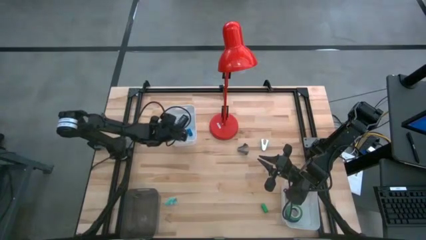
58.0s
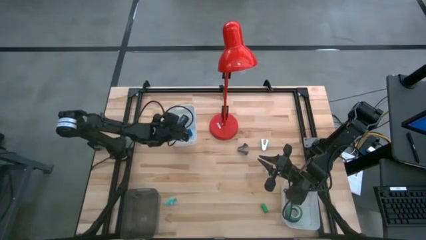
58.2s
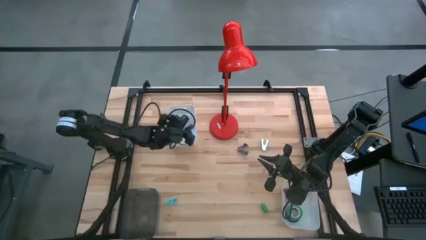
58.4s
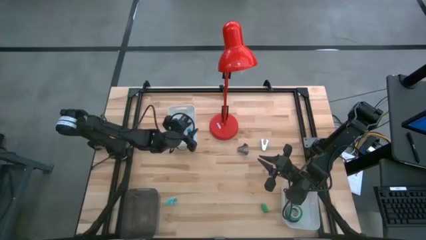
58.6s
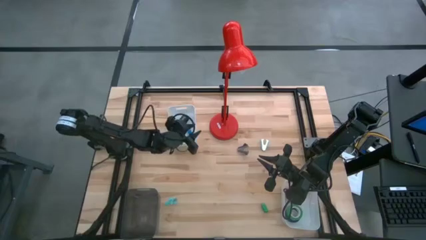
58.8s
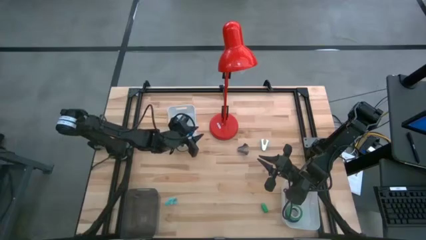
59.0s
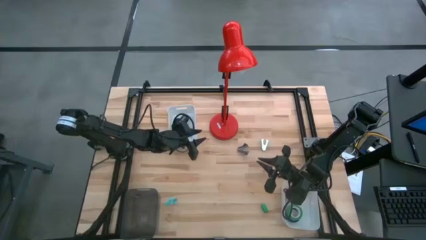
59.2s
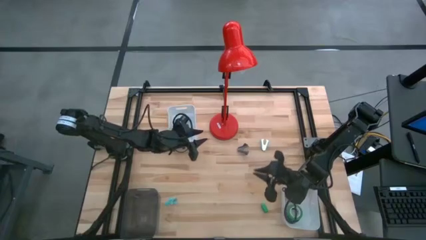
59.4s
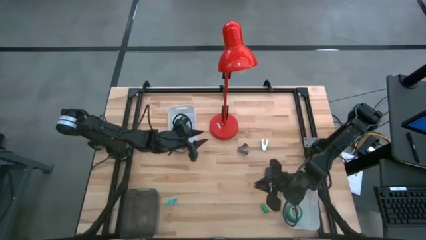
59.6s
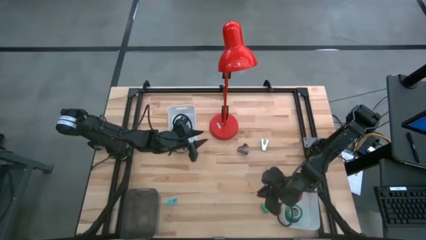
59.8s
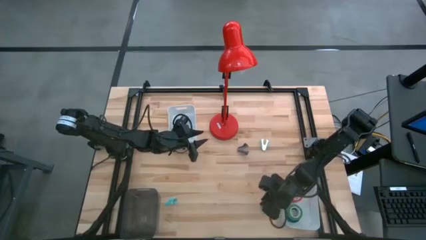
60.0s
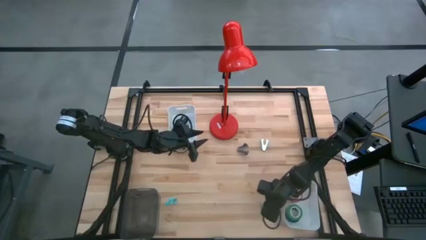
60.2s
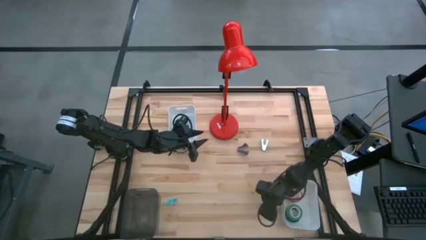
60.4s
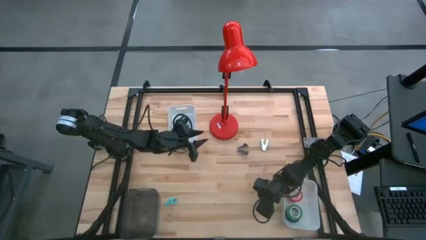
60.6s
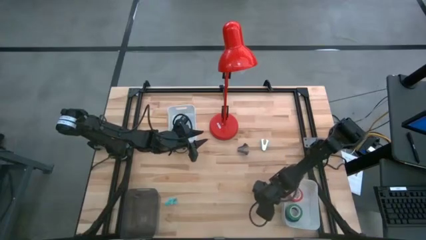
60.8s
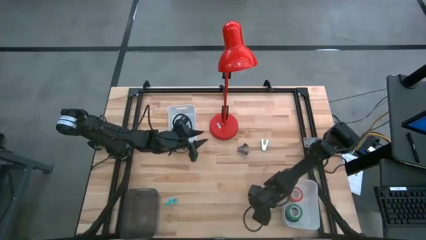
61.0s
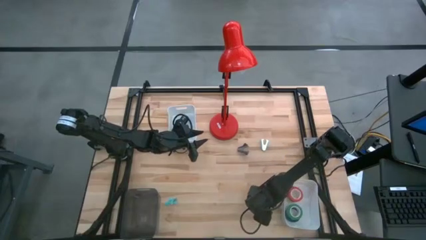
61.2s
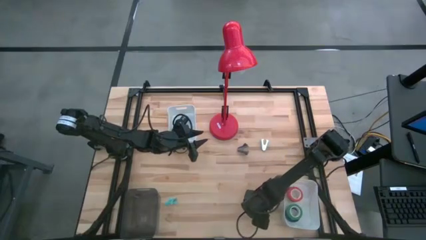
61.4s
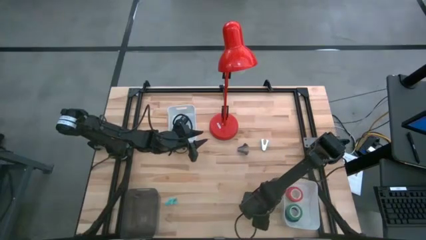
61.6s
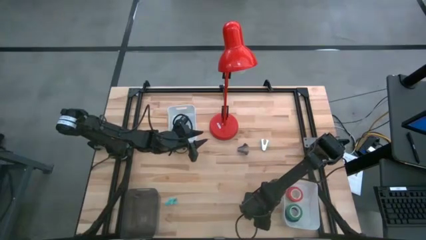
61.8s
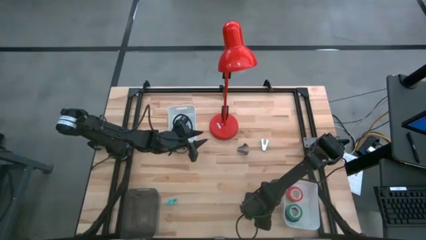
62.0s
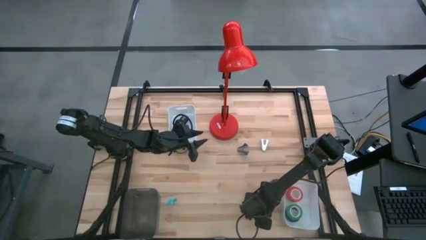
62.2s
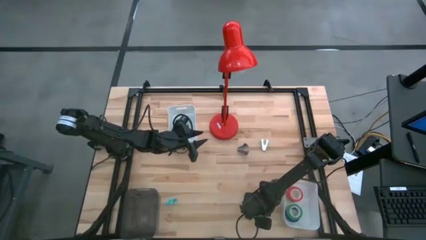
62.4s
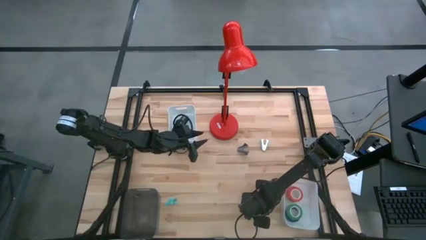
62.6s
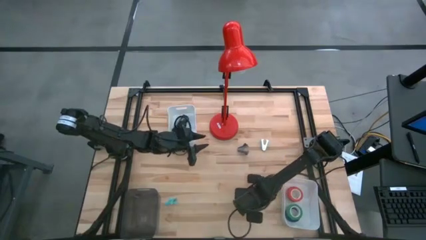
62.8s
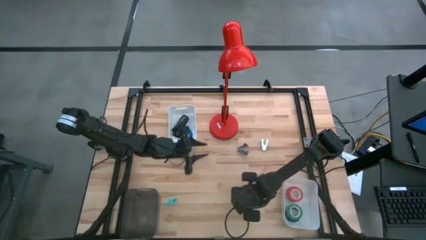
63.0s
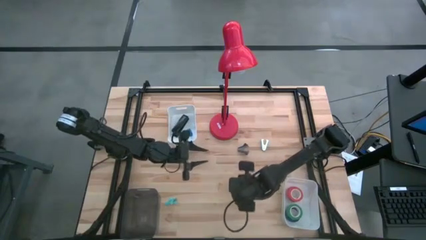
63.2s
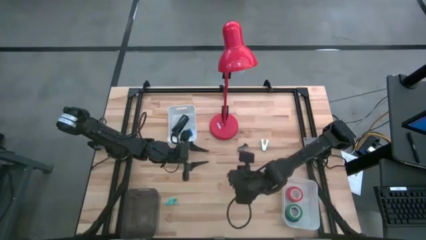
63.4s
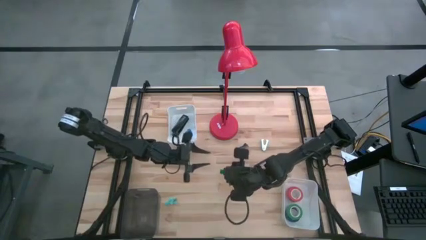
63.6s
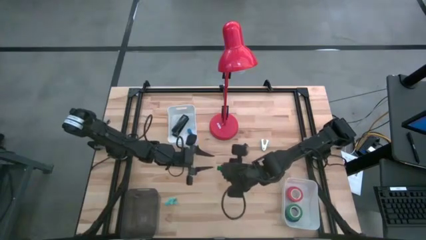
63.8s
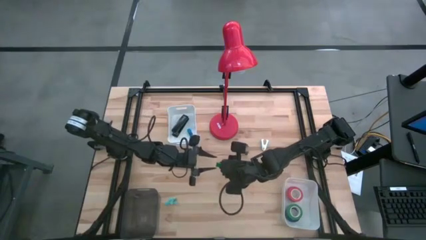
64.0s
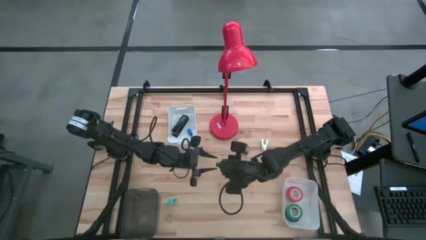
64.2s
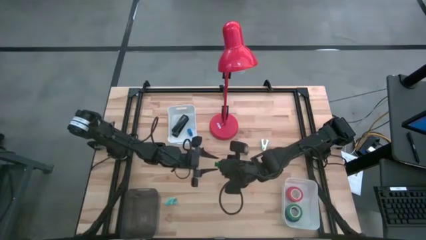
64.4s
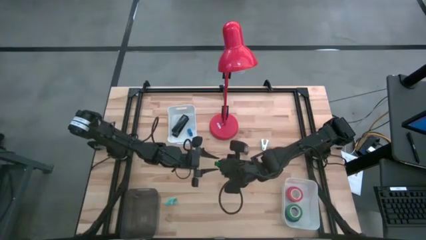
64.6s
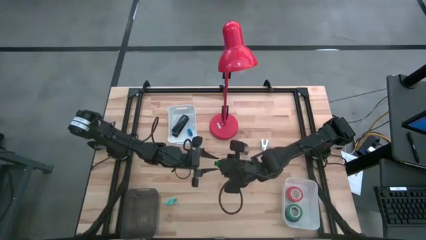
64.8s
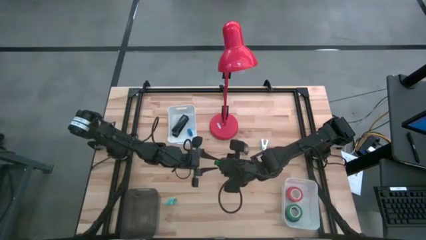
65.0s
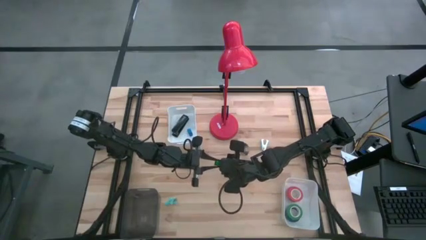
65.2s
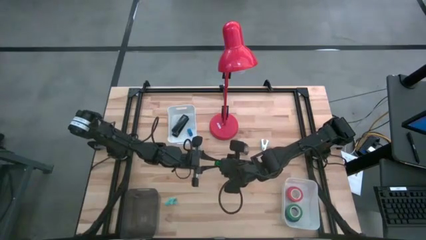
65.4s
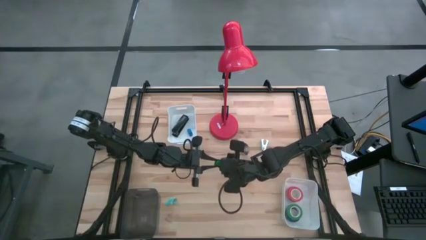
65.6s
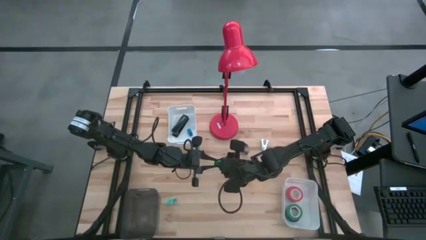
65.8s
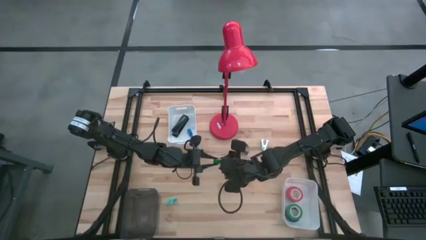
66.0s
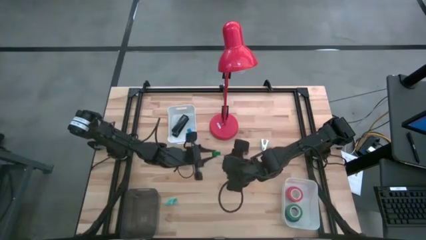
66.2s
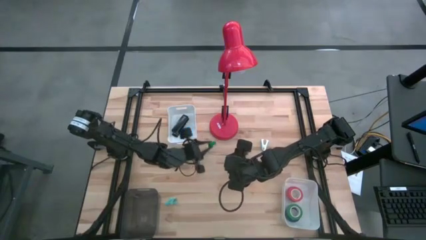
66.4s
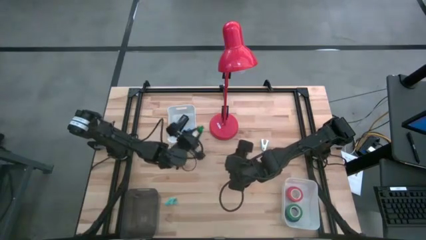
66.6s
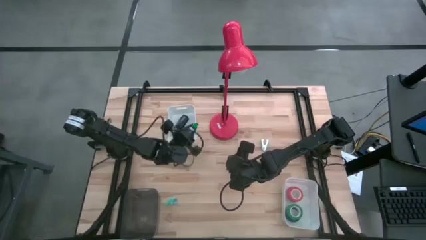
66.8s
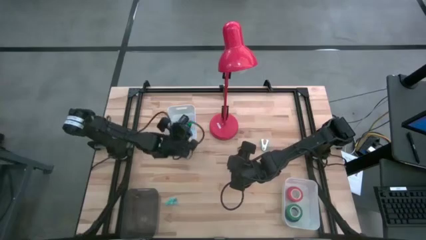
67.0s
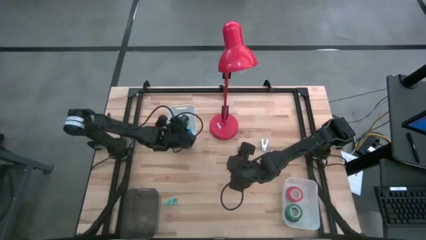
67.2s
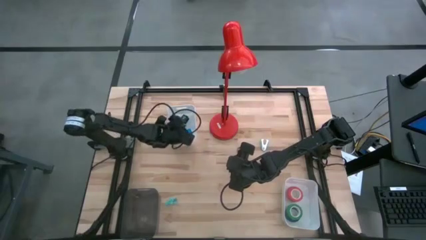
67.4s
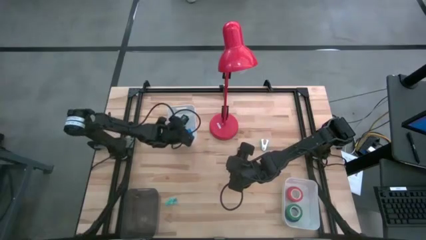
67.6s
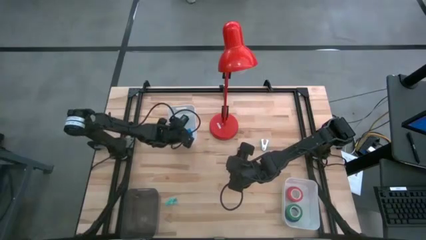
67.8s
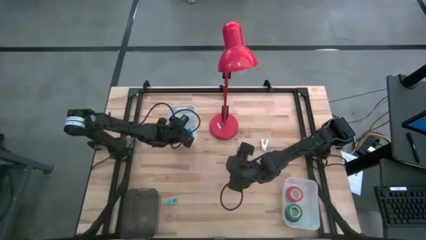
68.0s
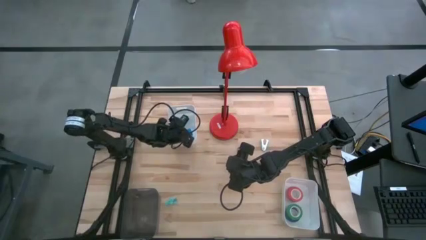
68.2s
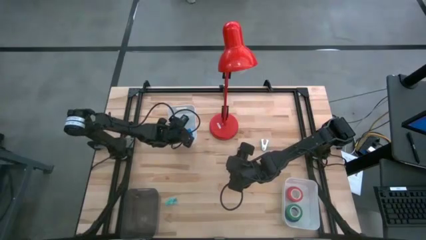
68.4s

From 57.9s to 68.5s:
Task: Pick and place Stapler, Stapler remover, tape
Put the green stapler into the top white bin

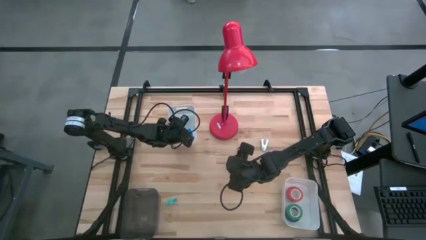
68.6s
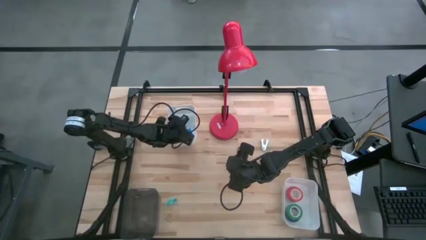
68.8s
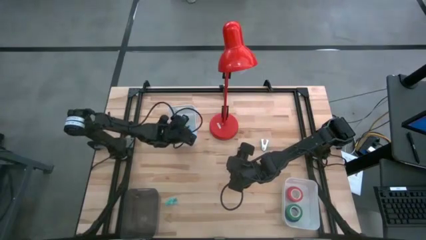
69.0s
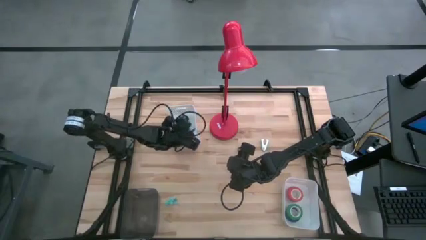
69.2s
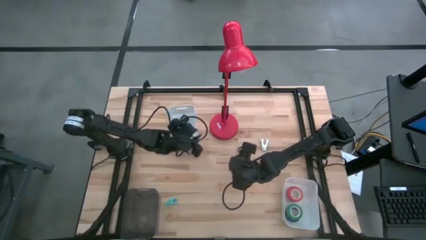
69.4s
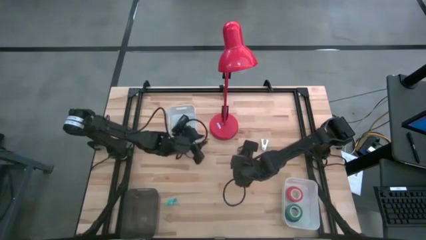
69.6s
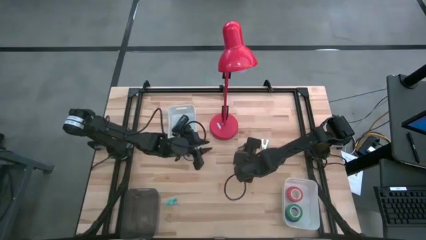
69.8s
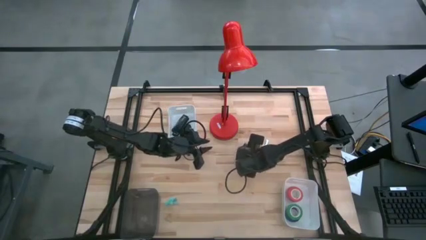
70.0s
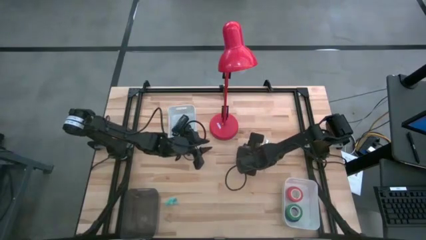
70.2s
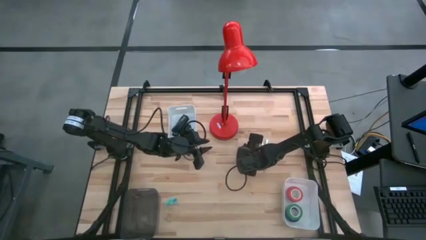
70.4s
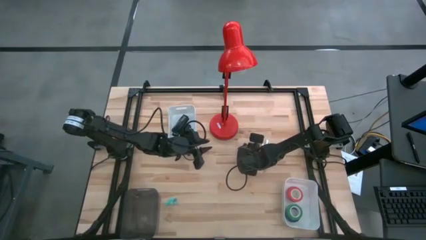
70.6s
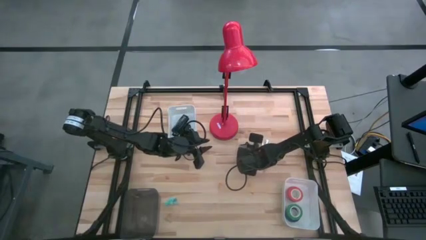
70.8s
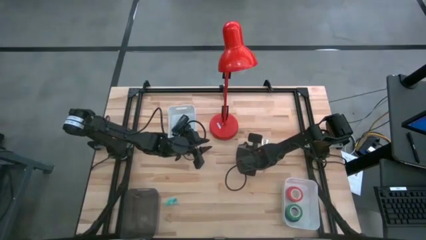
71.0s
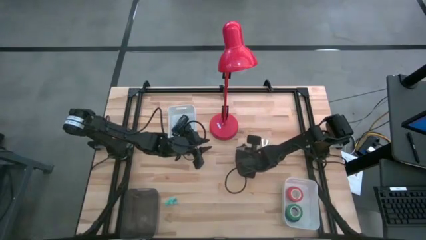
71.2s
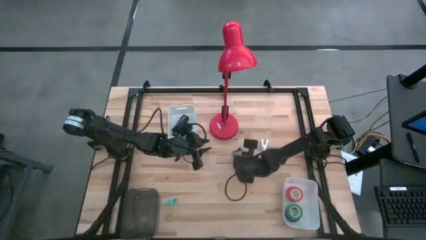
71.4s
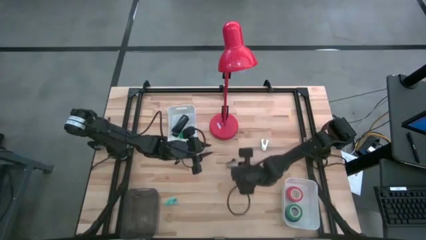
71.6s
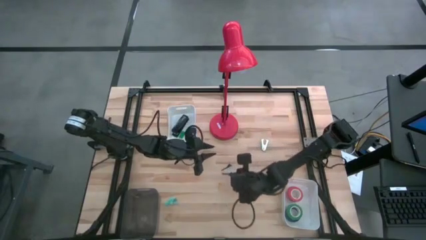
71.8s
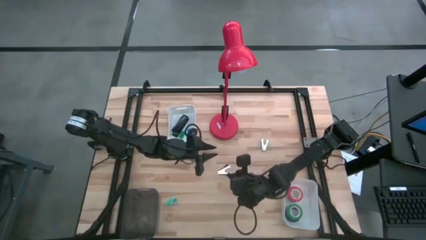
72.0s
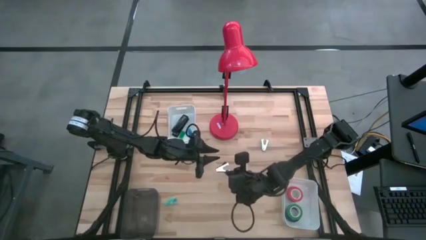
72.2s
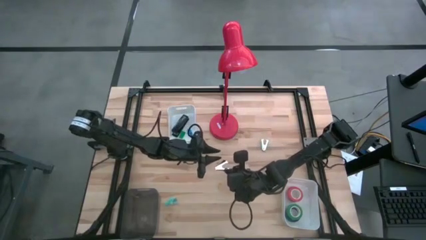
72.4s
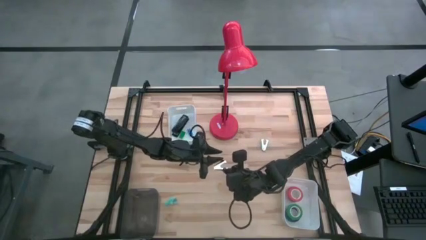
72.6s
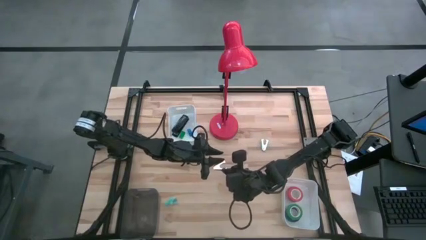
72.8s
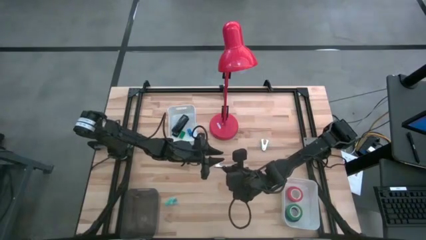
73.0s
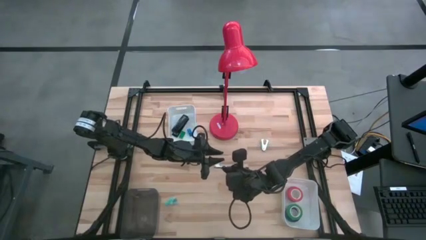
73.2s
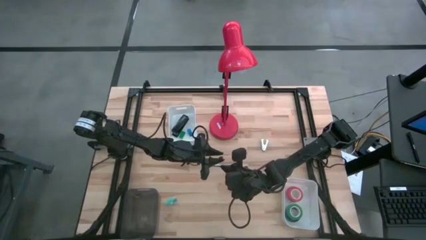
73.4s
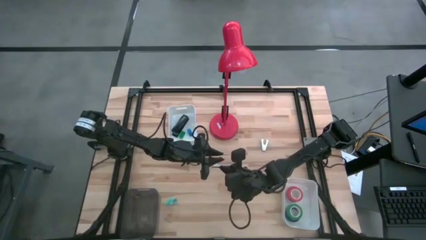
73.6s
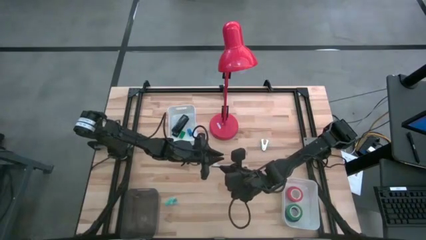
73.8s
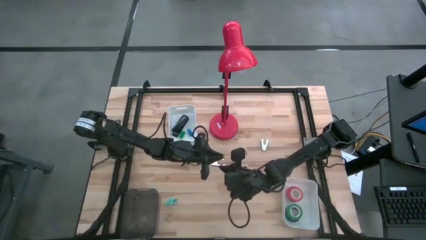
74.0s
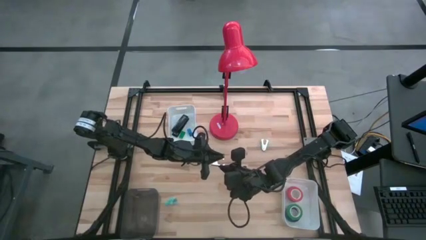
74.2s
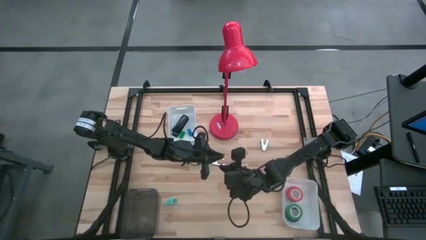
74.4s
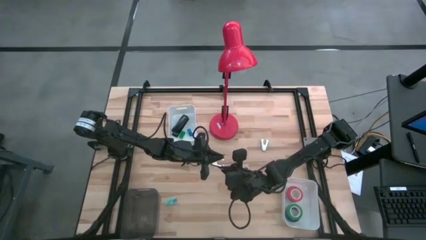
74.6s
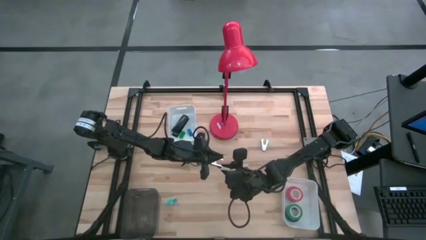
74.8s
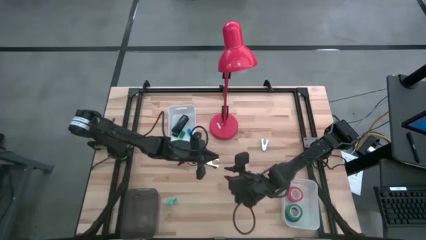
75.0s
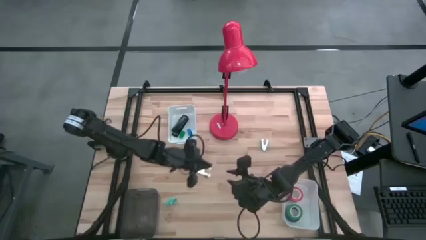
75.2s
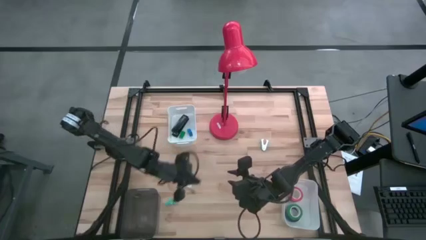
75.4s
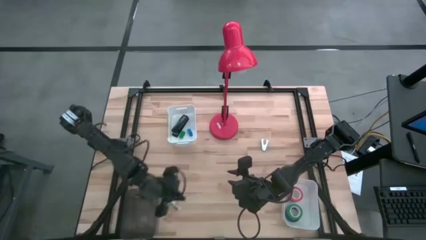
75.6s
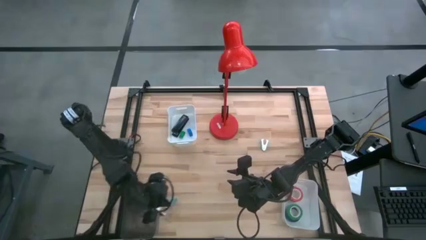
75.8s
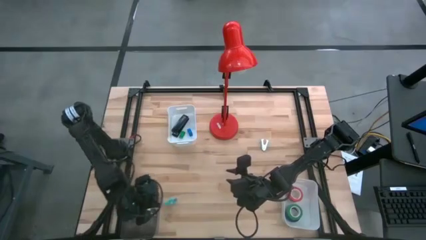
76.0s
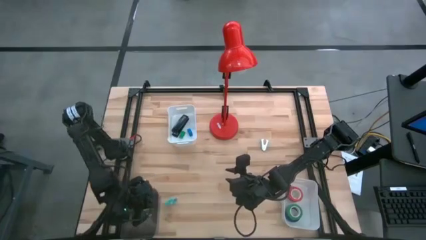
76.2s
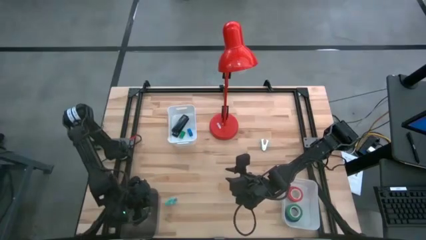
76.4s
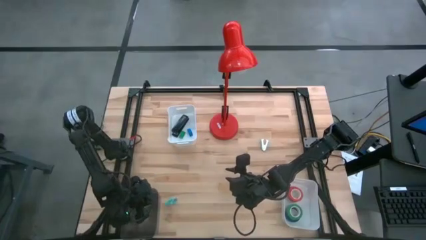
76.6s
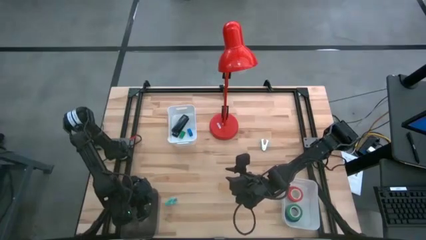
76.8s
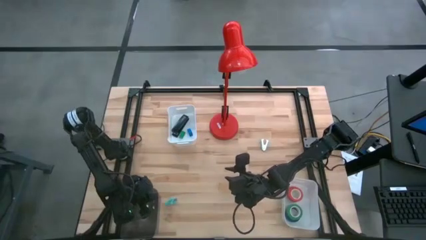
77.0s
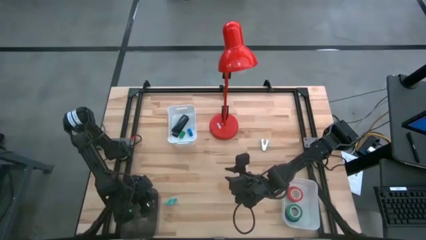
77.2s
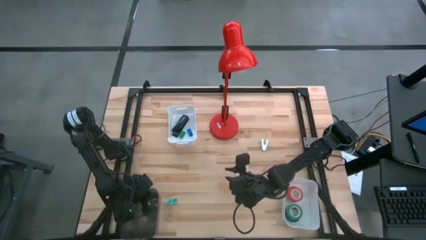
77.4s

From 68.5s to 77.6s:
Put the black staple remover into the black bin
